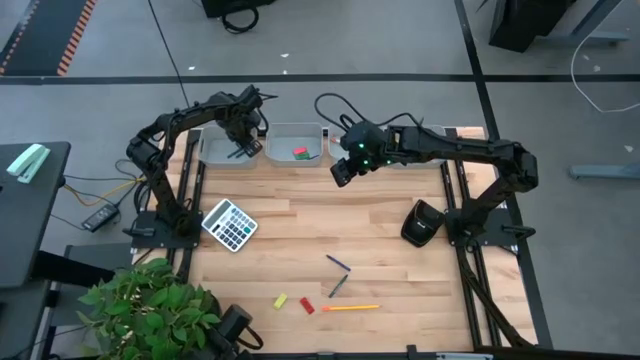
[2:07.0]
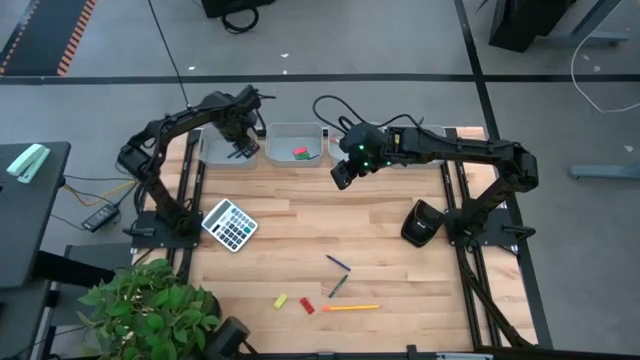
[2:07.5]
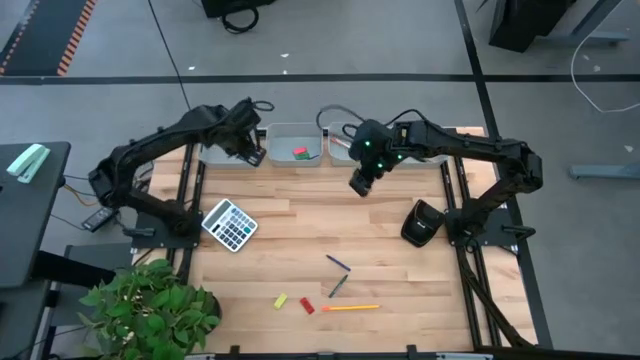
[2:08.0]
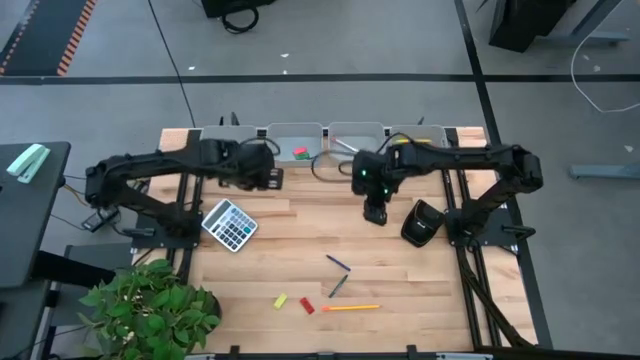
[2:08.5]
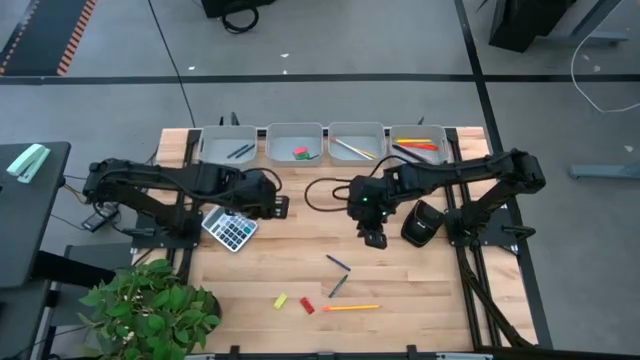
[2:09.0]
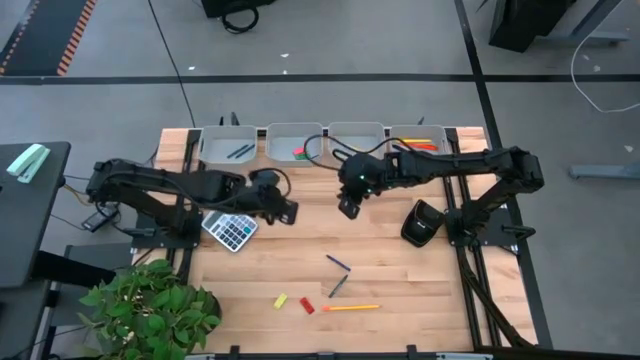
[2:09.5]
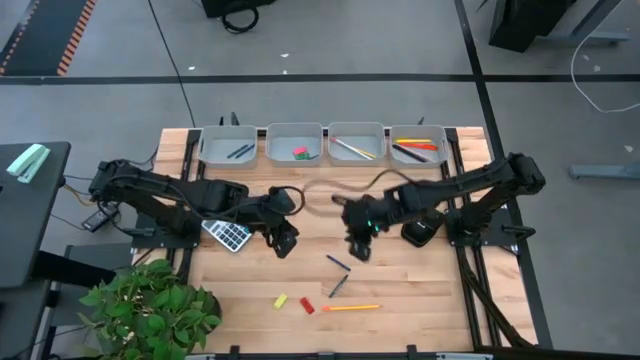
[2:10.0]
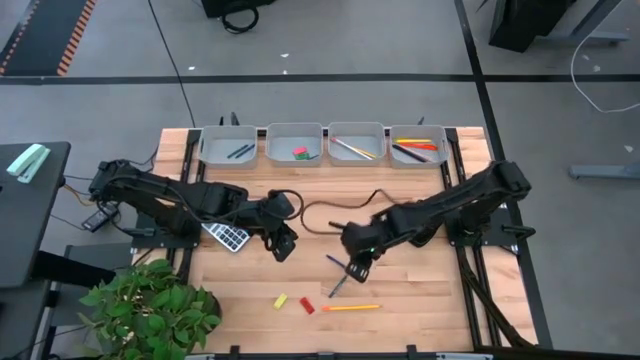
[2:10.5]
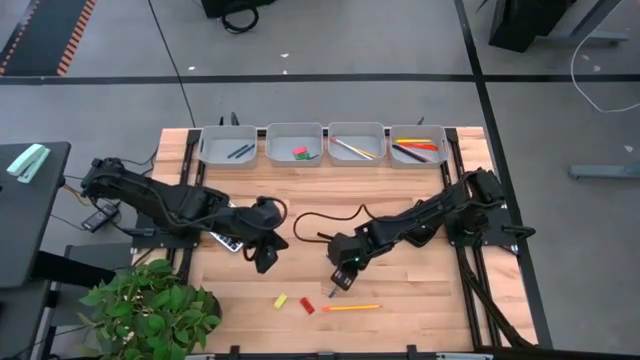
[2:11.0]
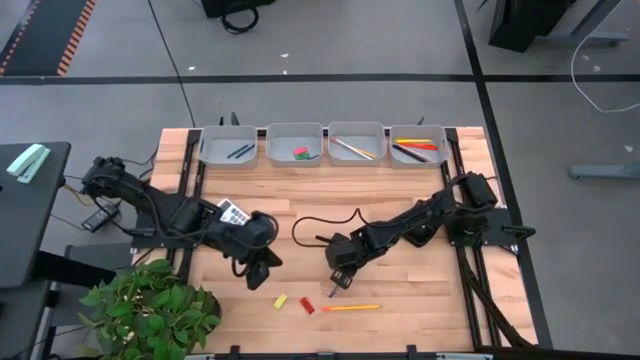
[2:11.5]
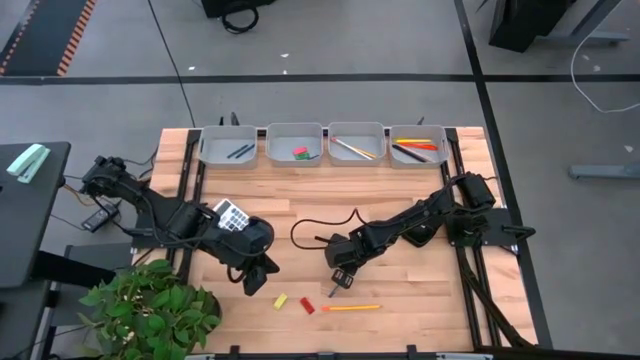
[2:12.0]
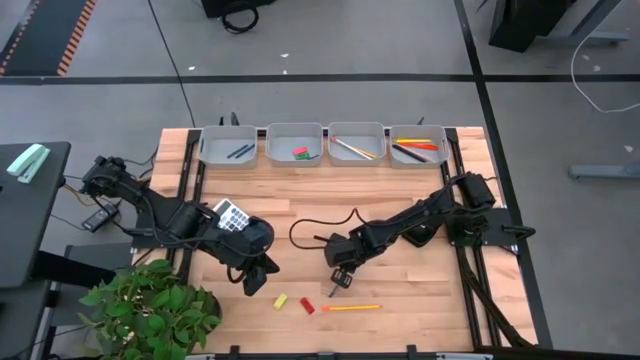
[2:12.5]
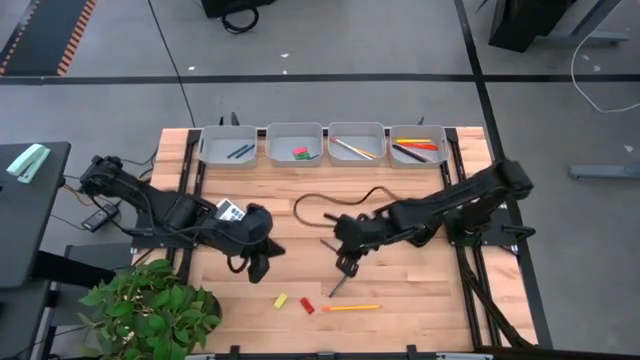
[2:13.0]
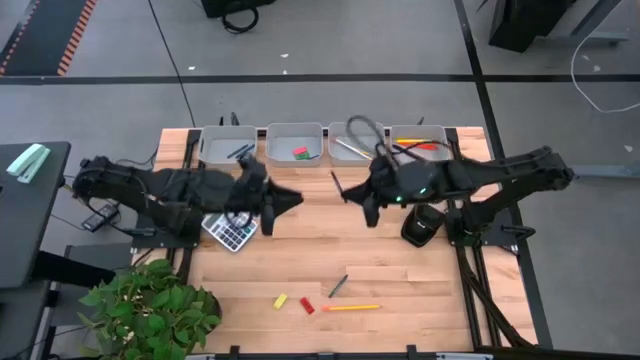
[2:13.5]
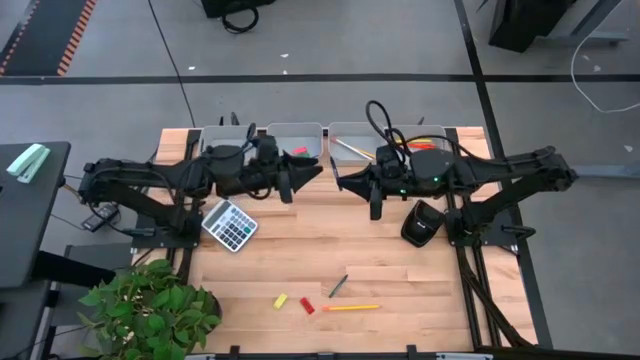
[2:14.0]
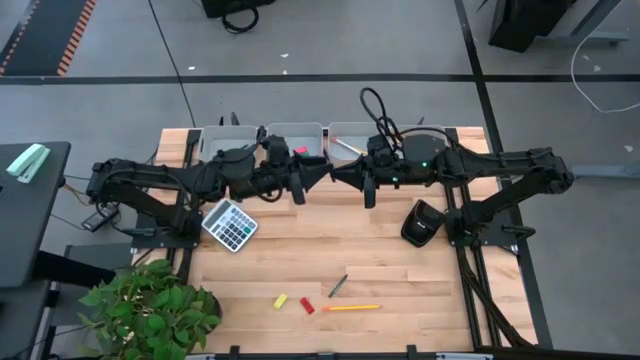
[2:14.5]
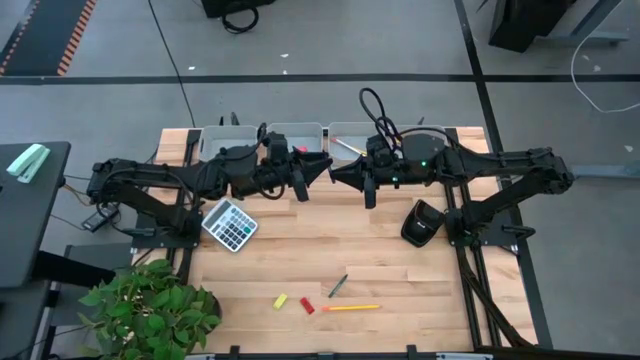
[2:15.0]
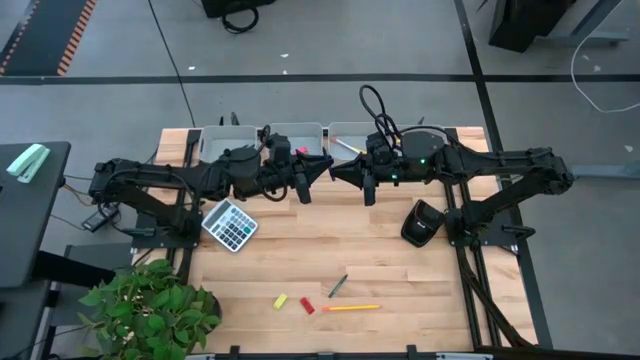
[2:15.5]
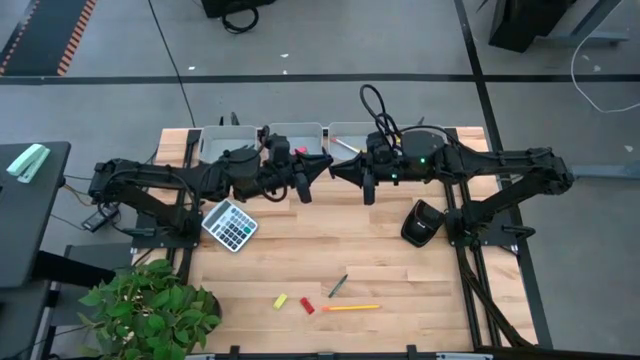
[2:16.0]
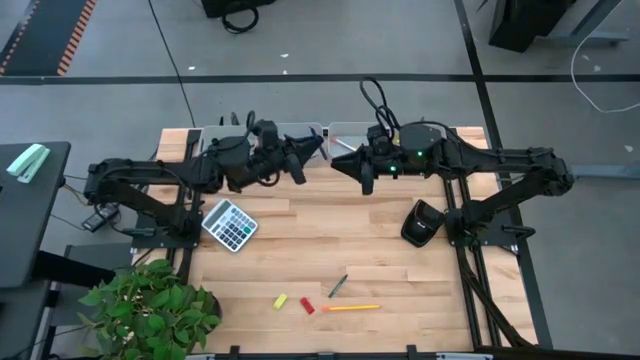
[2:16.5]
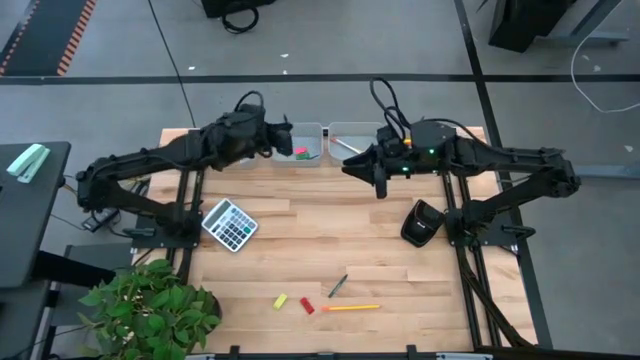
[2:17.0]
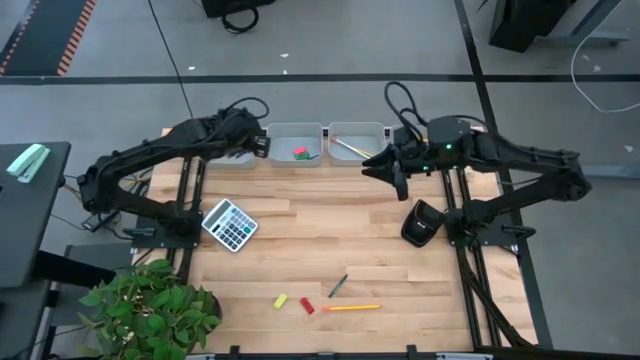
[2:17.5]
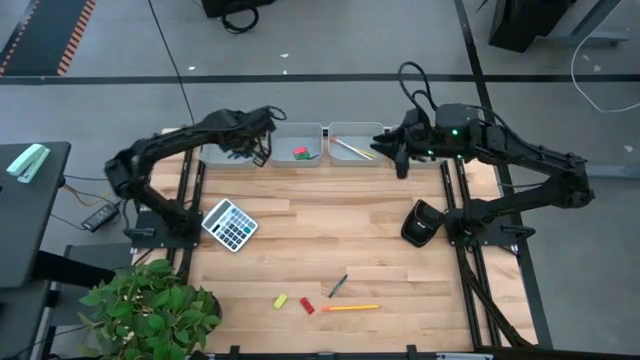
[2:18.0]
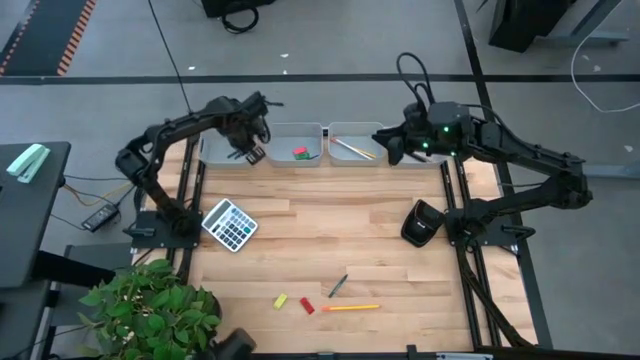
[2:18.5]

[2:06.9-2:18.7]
Task: Sort crayons/erasers/pens/pencils in bins
Put the blue crayon into the gray bin

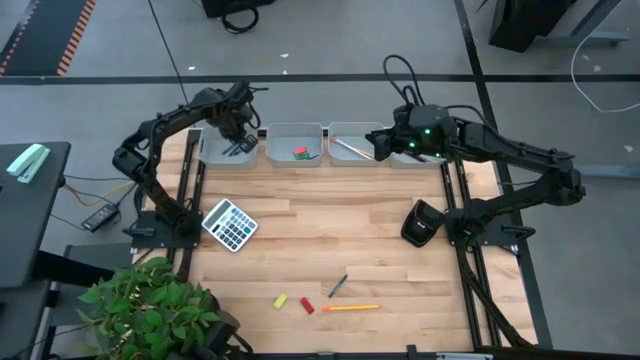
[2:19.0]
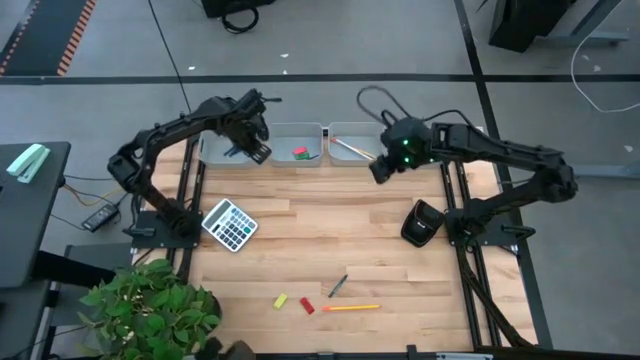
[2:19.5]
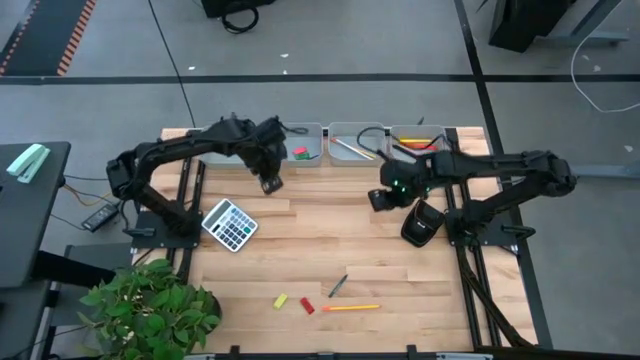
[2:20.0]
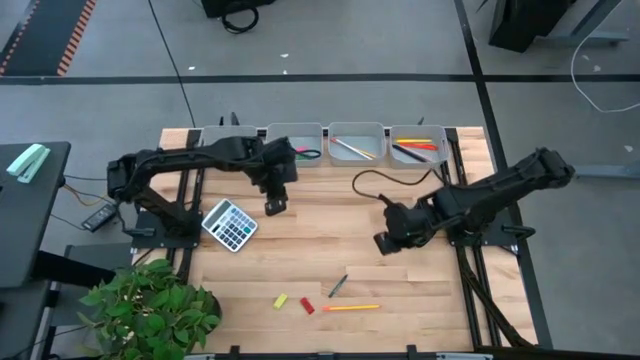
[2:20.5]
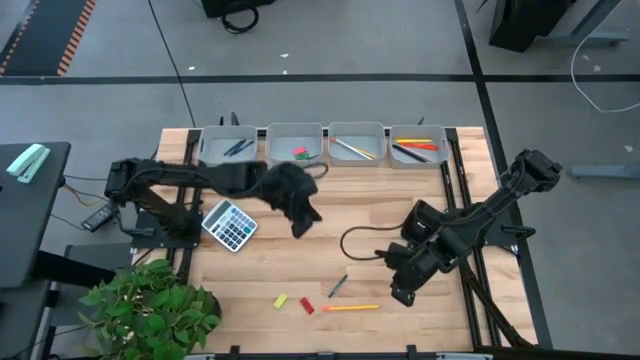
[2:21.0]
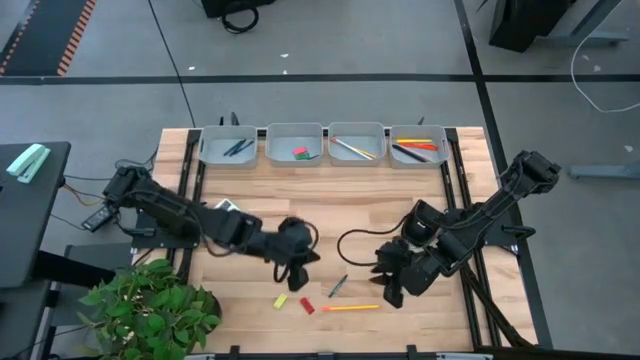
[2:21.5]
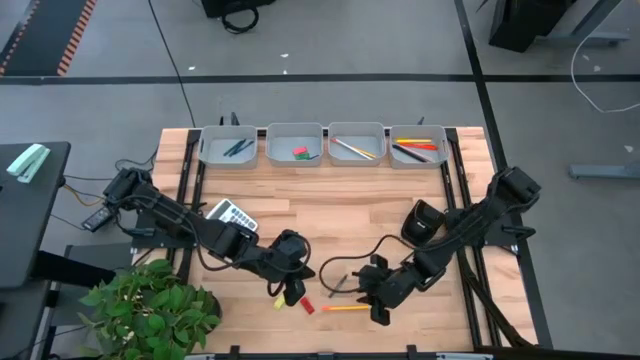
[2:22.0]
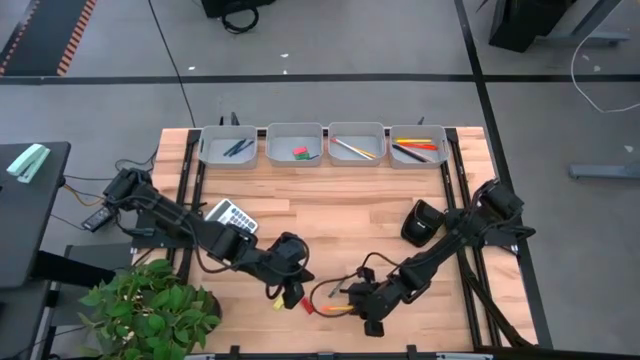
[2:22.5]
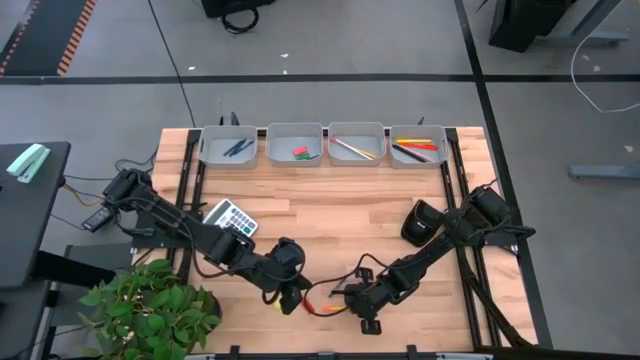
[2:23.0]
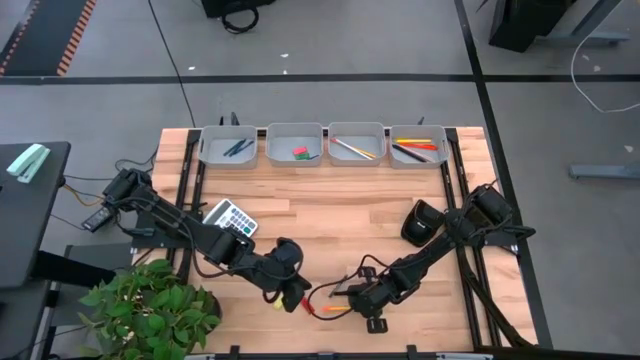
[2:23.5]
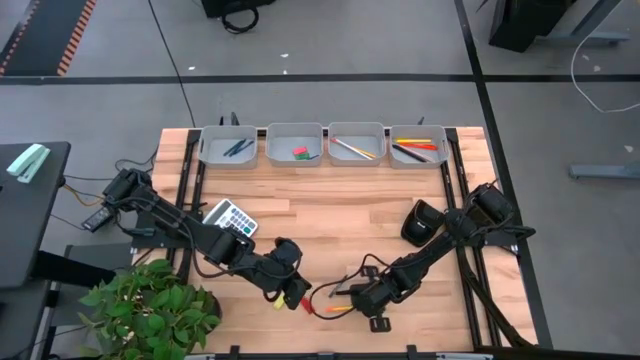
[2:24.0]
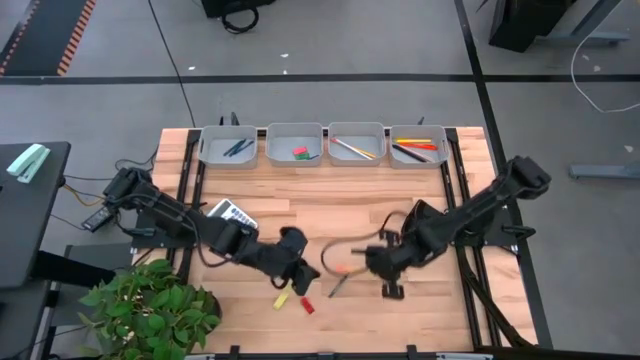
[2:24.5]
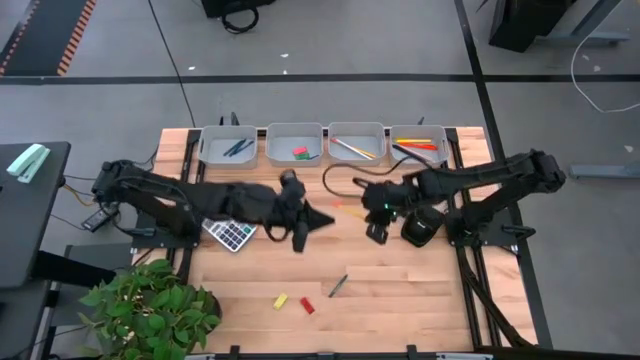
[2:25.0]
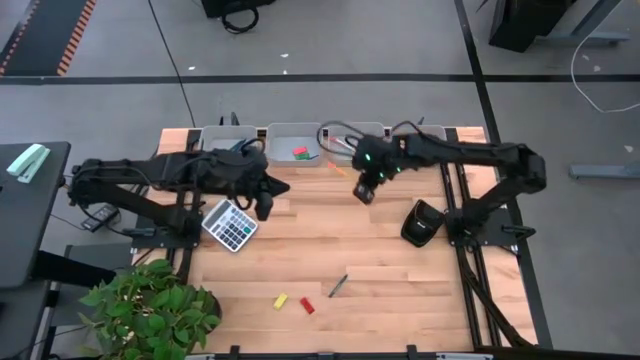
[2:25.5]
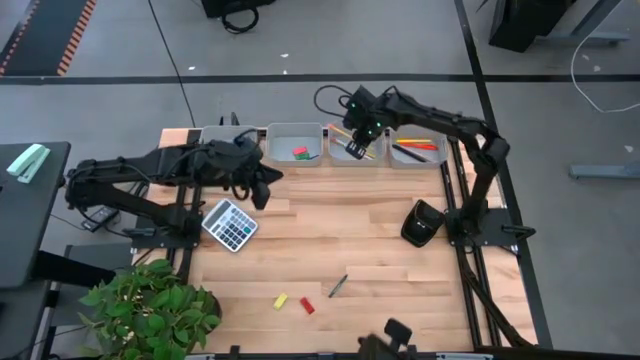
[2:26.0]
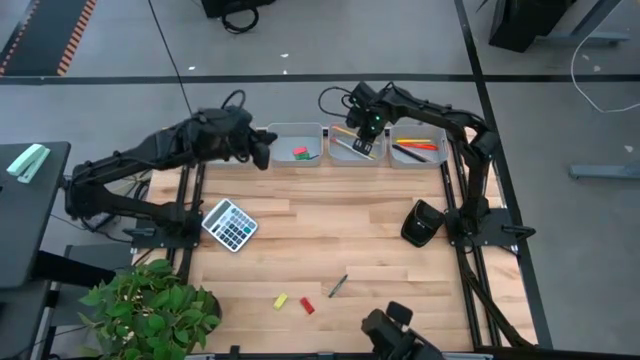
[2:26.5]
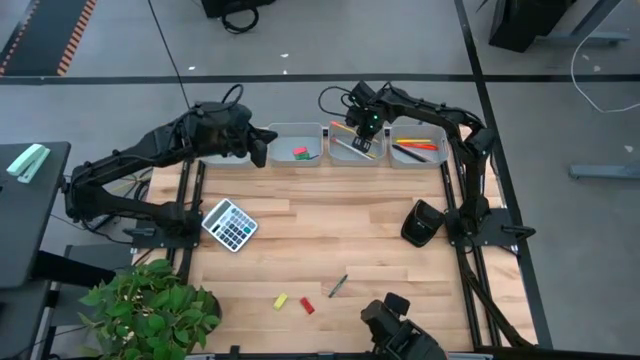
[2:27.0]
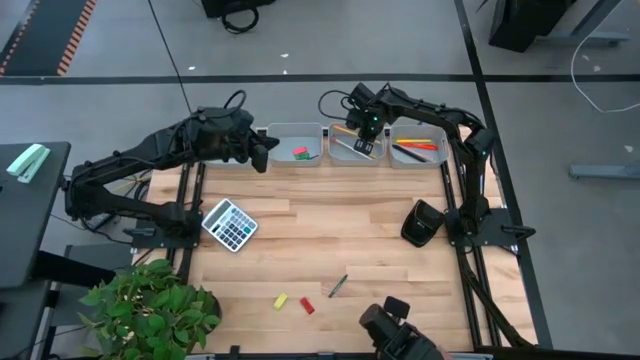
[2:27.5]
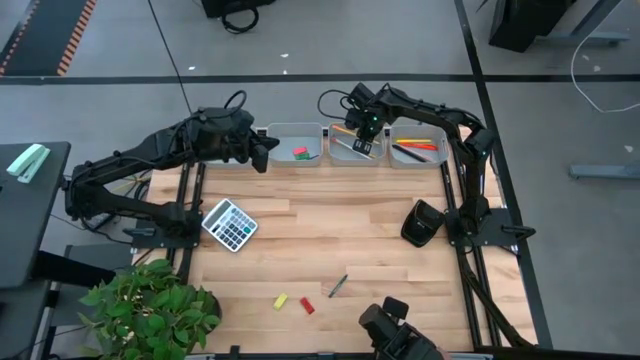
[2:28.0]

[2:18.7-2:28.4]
Put the yellow pencil into the gray bin
